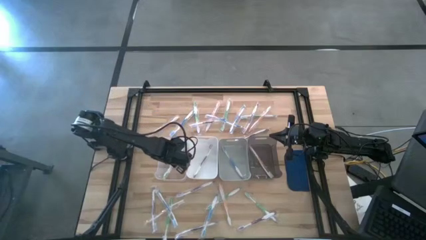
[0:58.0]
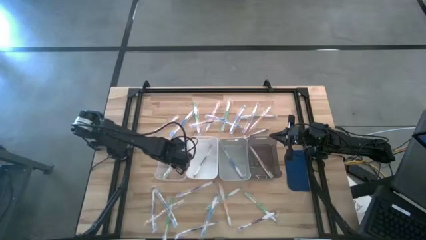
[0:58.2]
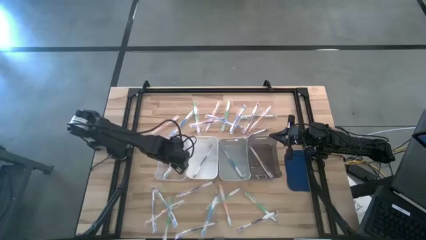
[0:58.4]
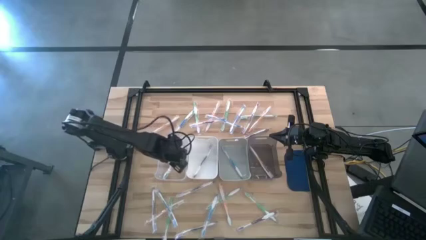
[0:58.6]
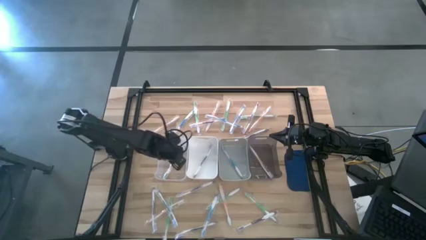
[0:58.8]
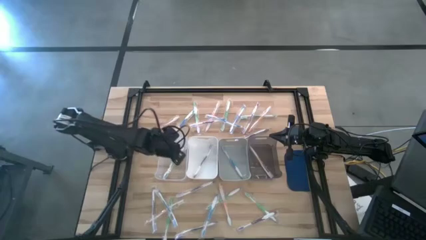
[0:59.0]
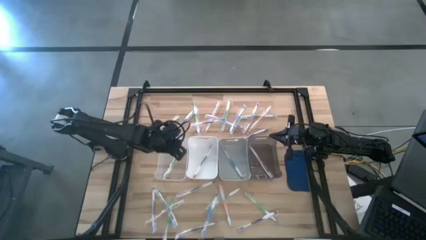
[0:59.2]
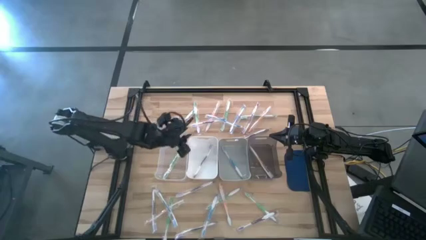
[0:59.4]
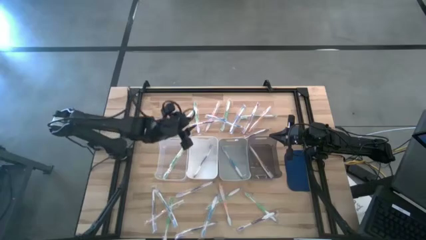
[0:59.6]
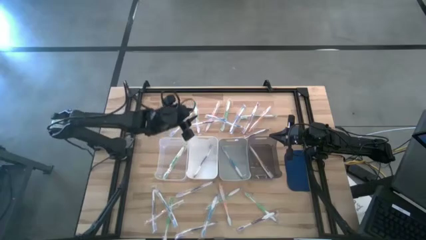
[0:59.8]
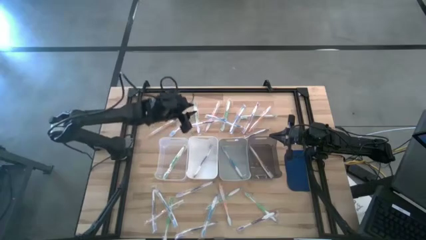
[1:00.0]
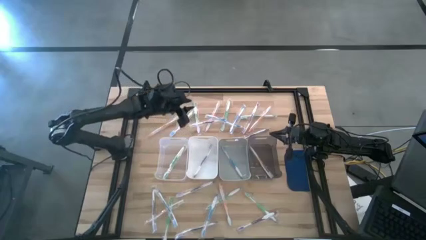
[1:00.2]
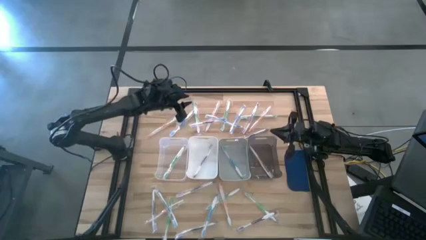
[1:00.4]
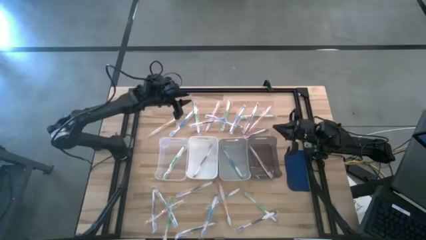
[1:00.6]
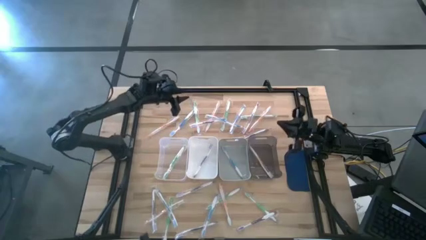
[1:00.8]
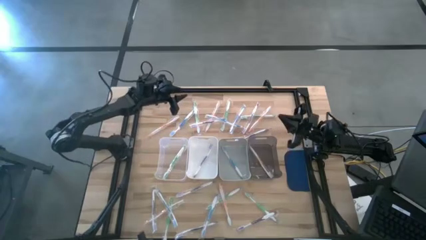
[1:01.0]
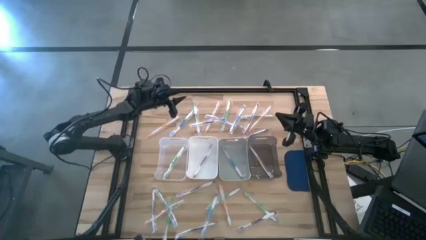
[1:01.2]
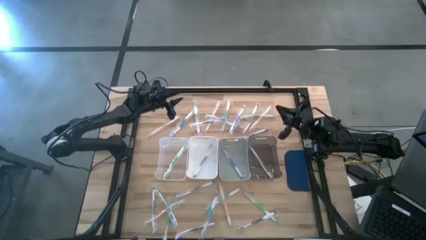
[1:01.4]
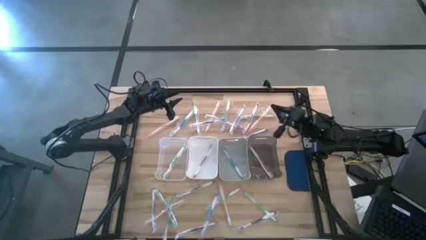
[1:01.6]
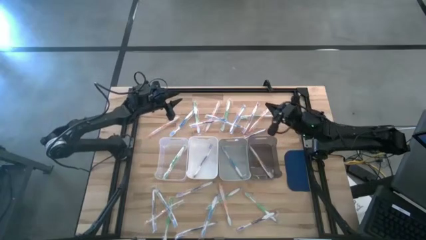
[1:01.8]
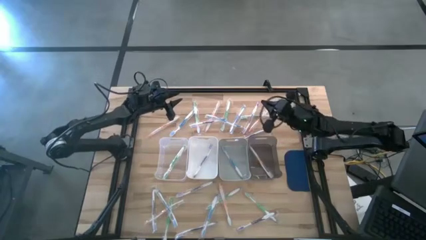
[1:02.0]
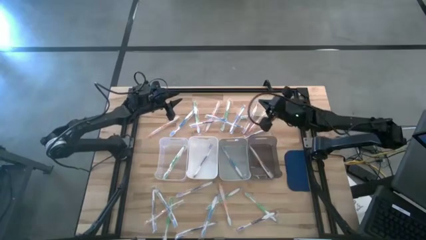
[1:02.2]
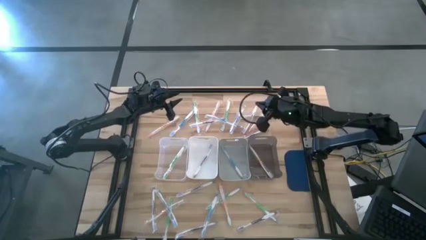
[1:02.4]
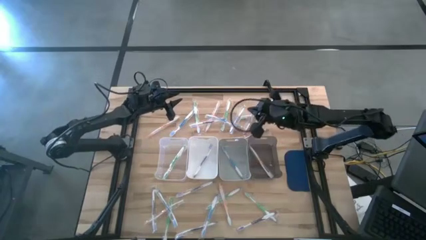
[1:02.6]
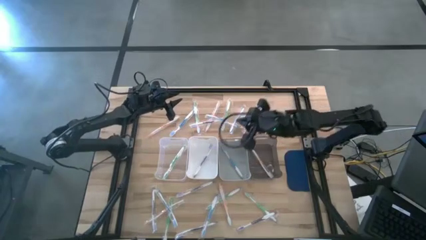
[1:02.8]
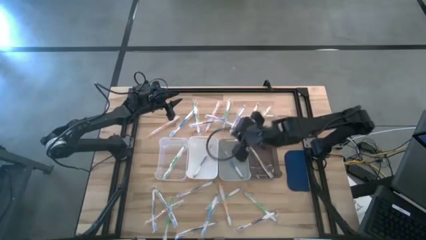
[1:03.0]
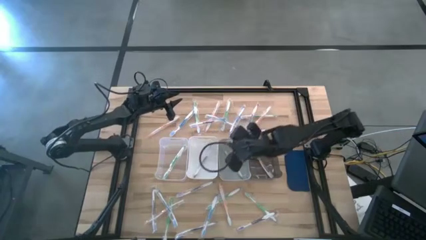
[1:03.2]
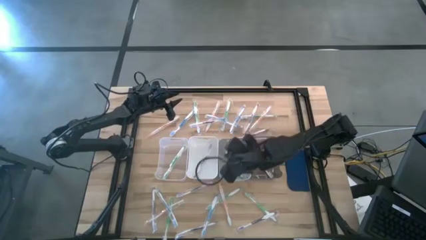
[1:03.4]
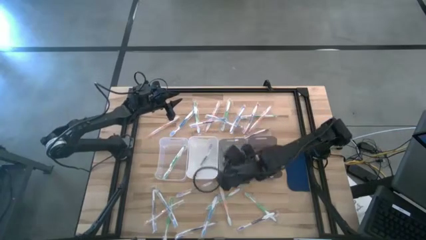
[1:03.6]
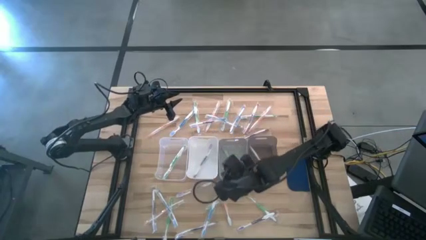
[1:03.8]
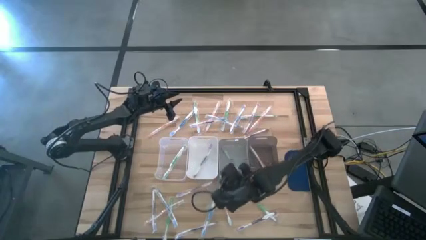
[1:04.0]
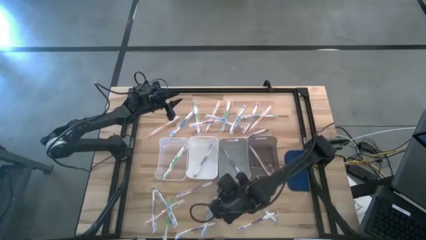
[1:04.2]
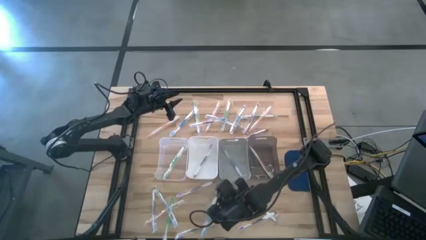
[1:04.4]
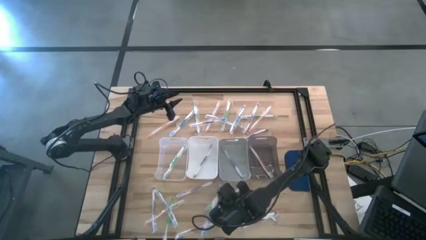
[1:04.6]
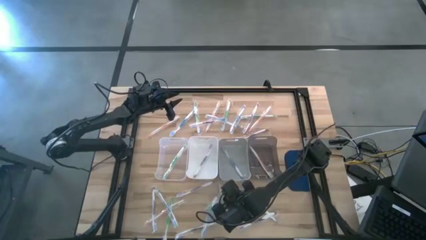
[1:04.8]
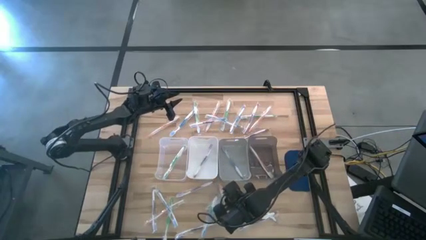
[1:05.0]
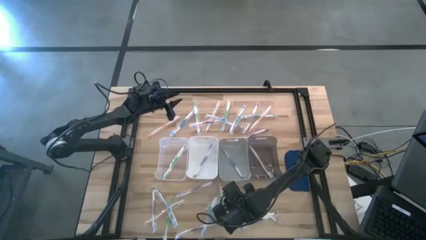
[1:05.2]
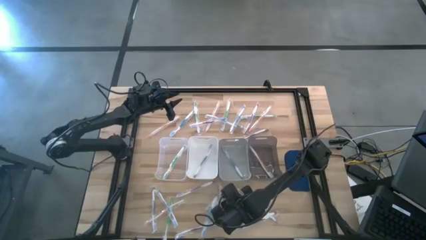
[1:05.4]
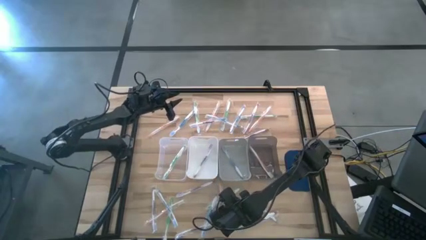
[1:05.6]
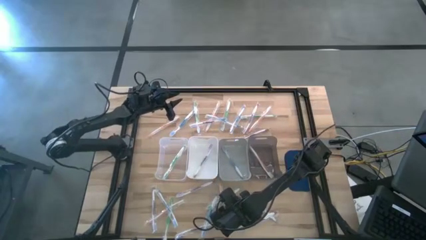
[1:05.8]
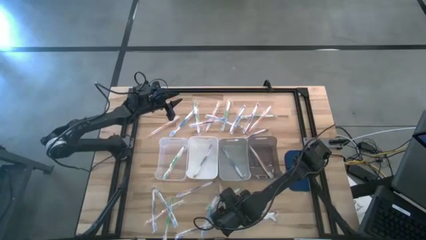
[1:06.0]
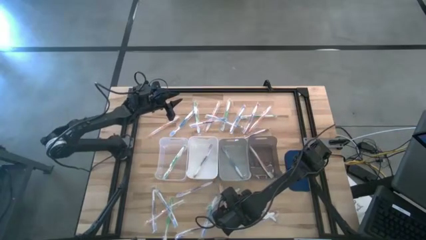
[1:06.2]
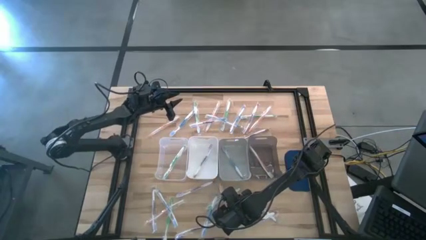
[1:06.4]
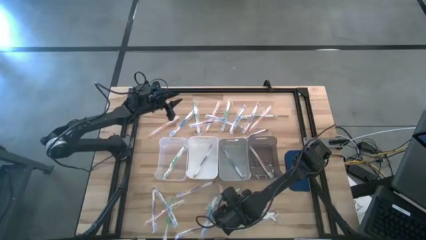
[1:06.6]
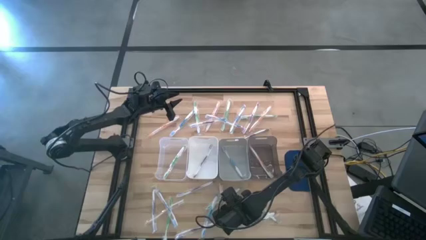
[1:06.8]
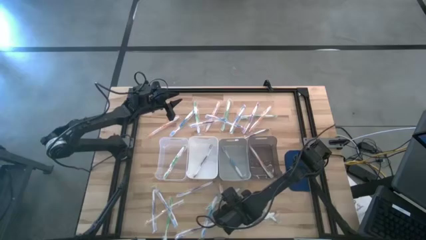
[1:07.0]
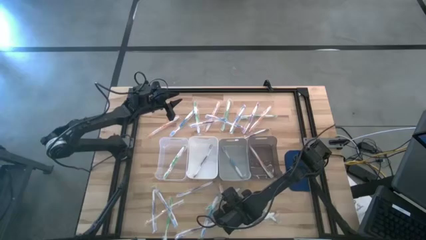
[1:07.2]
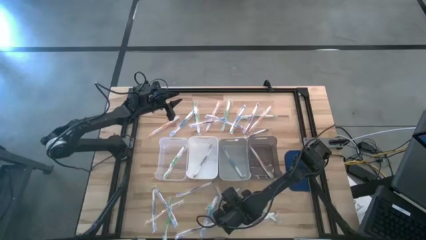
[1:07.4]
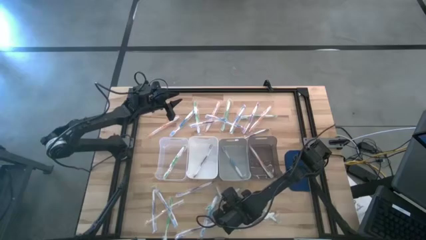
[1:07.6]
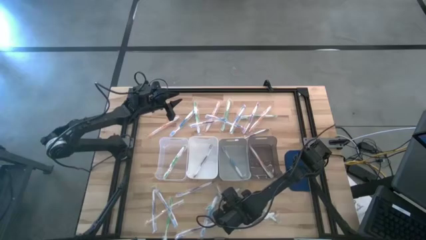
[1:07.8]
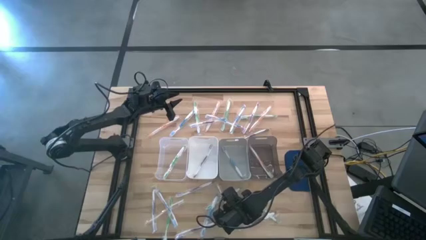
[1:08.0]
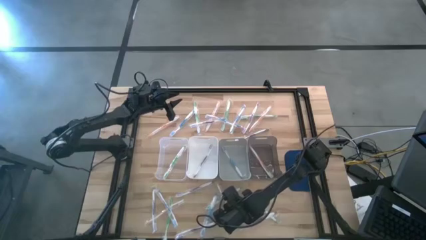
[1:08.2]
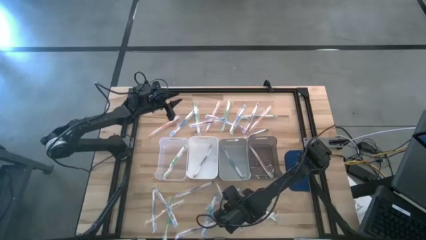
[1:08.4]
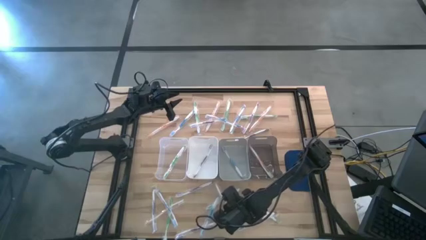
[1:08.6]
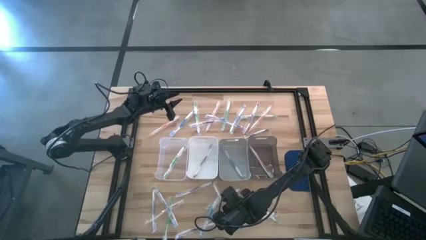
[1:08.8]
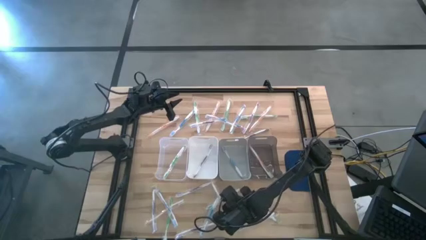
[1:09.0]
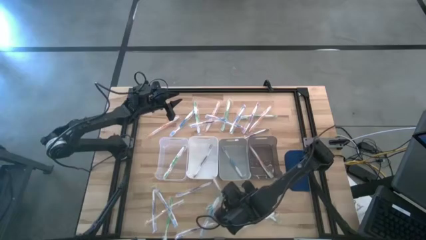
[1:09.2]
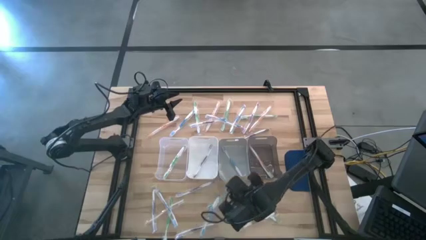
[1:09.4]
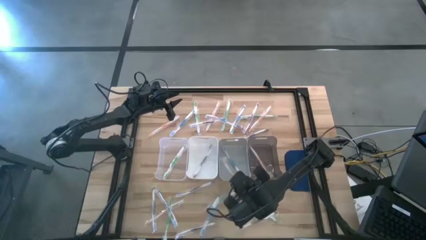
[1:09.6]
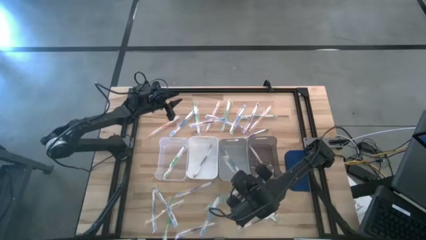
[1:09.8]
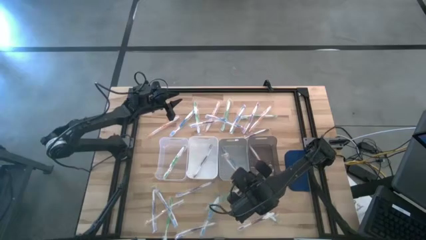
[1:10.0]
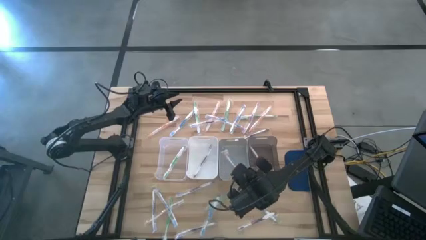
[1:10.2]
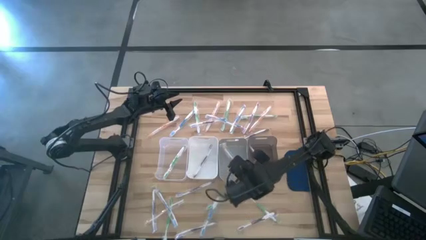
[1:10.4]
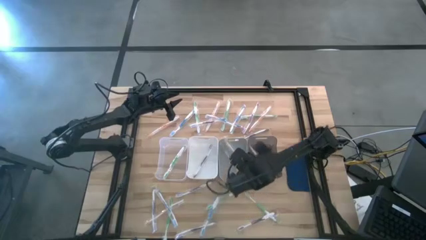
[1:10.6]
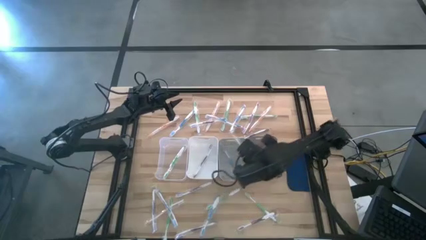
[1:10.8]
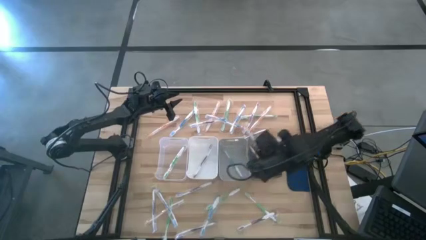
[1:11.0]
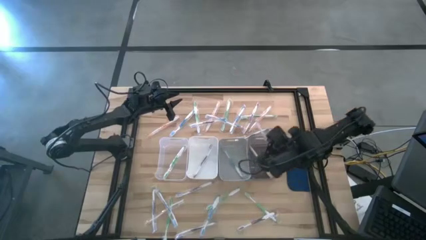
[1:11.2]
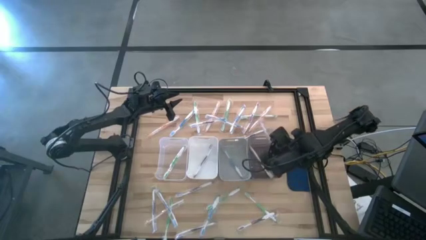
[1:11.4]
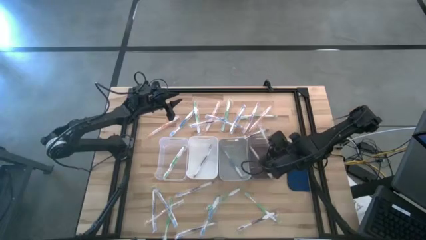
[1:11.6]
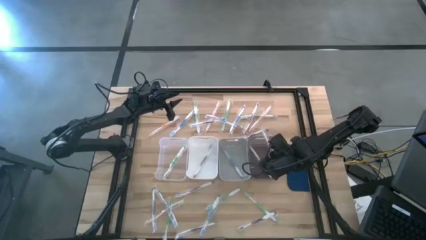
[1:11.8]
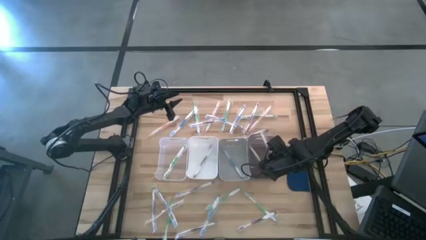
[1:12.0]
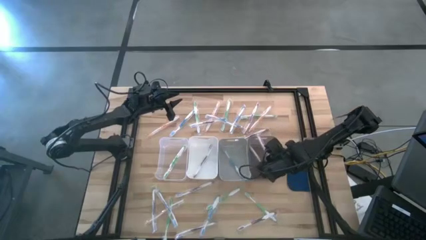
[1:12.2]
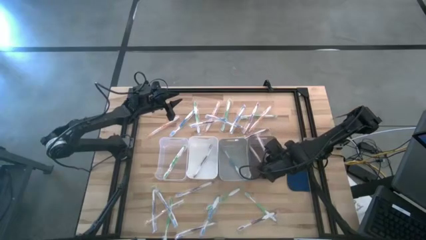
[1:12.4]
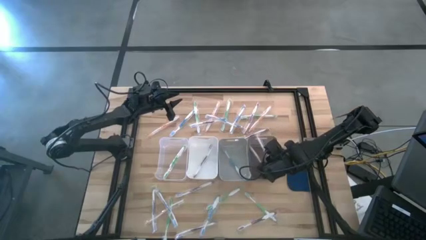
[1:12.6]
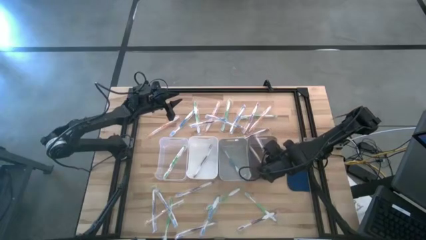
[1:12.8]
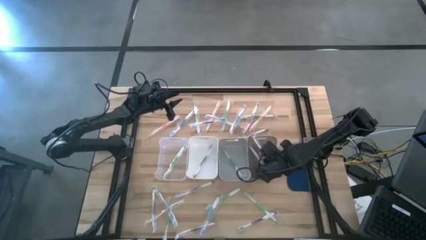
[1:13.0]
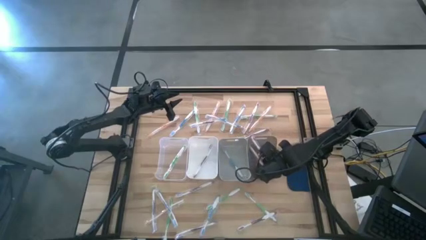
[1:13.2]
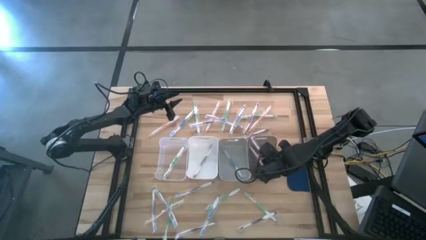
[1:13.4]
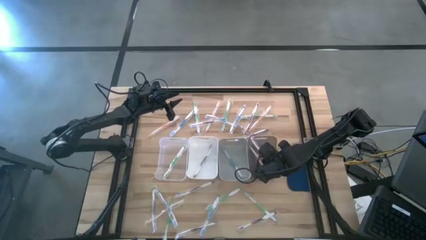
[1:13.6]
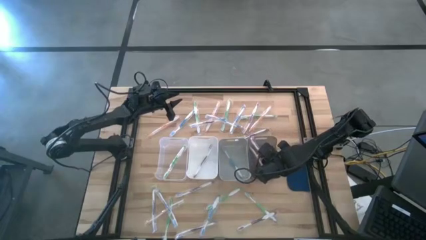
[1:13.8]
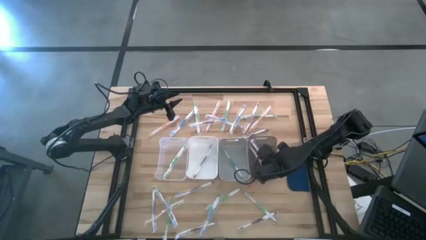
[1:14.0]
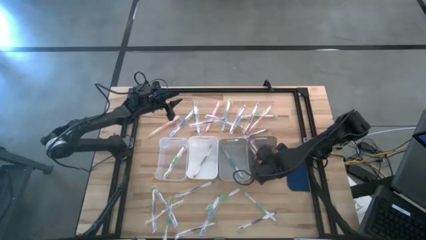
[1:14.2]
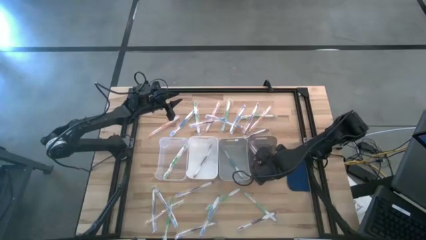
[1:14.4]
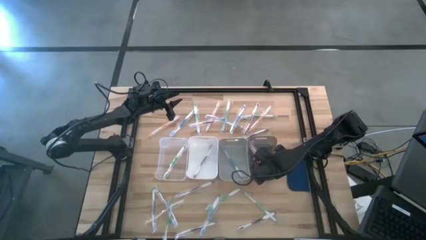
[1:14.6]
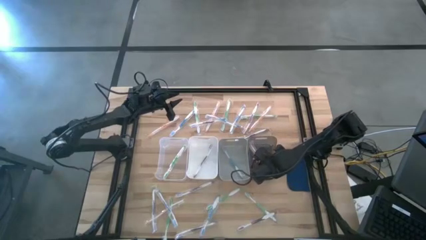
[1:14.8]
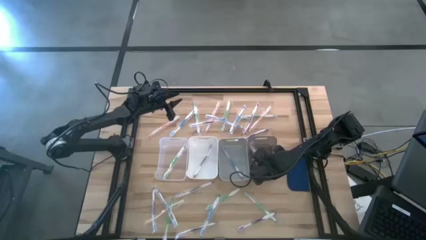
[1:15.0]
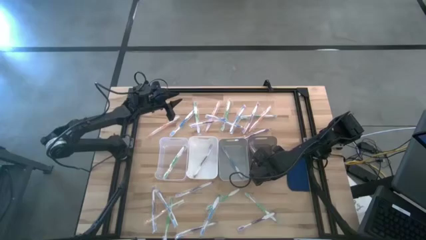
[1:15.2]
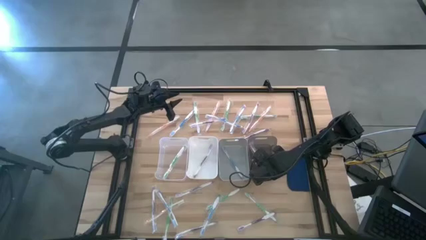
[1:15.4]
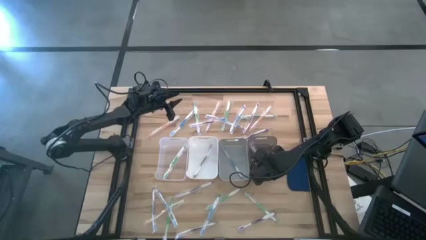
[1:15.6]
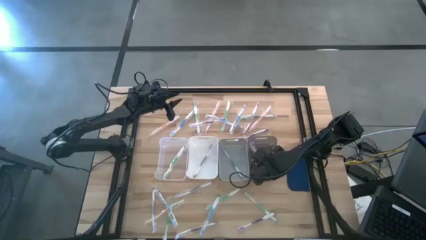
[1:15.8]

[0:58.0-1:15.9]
Task: Pick & Place Toothbrushes
Put the orange toothbrush into the black bin
